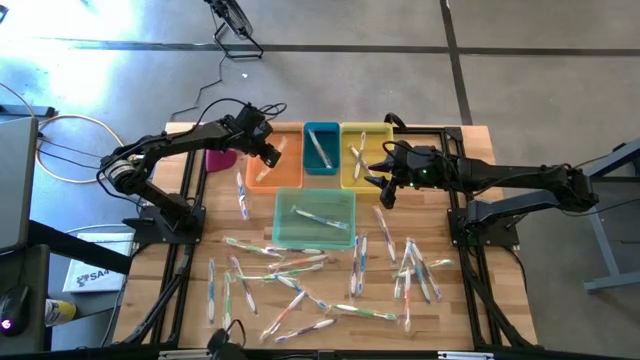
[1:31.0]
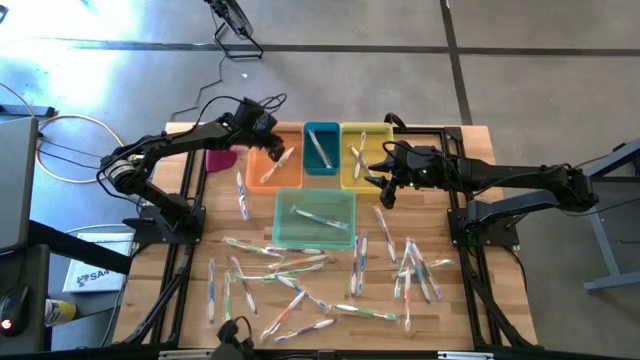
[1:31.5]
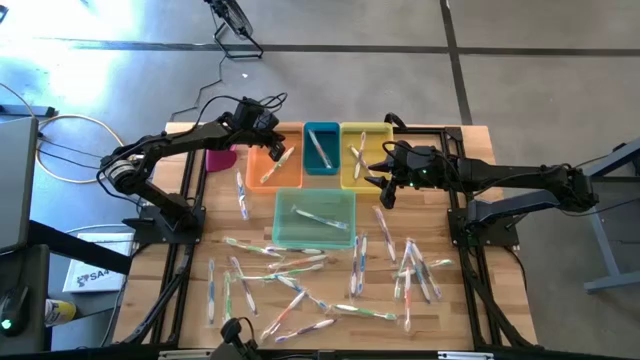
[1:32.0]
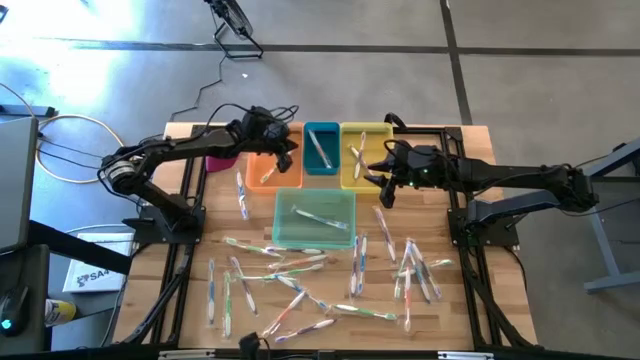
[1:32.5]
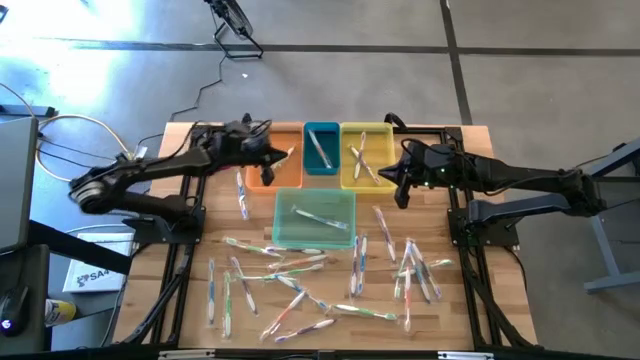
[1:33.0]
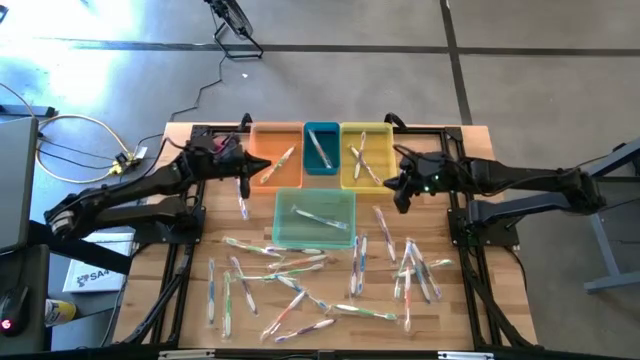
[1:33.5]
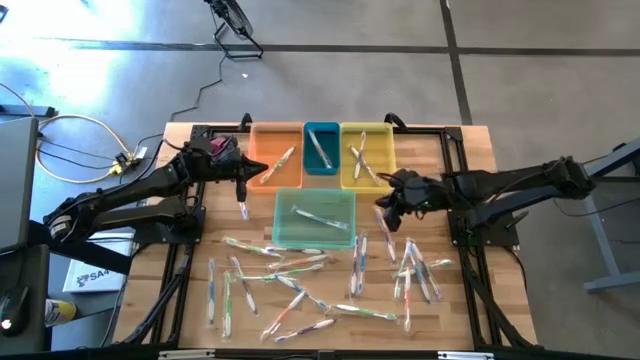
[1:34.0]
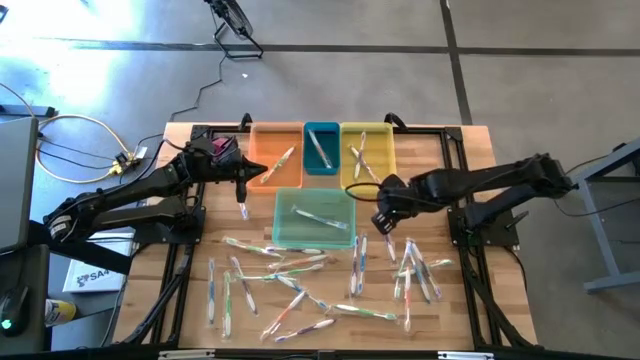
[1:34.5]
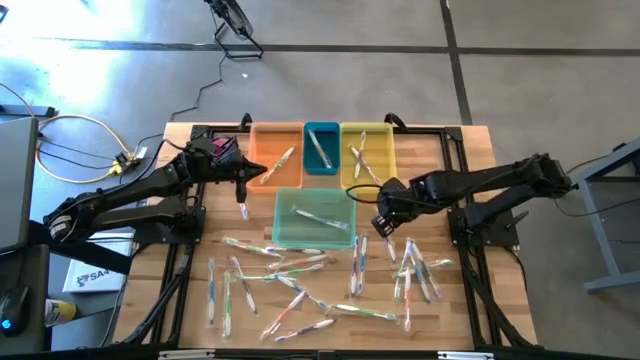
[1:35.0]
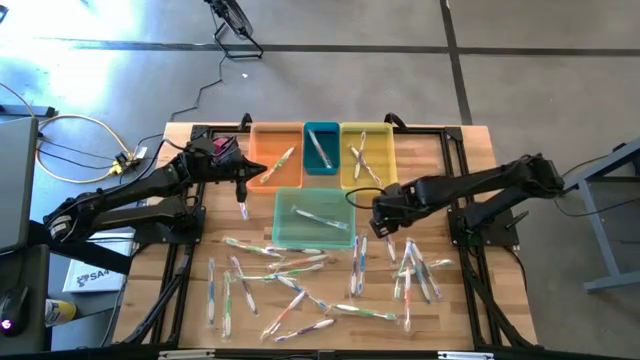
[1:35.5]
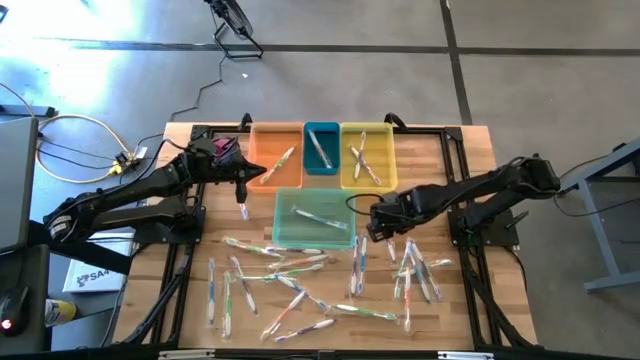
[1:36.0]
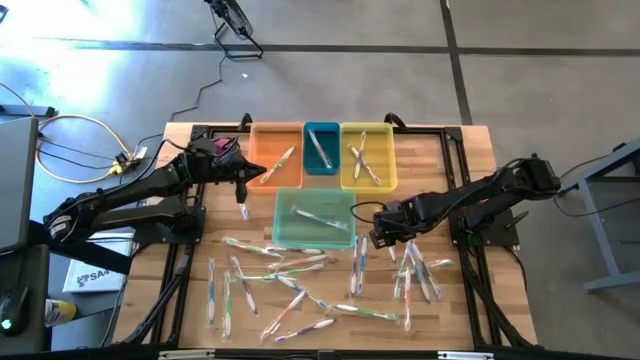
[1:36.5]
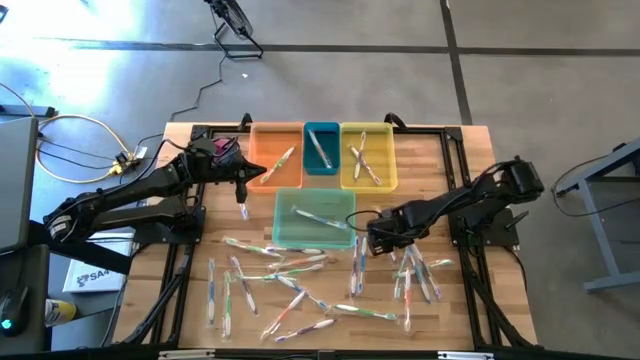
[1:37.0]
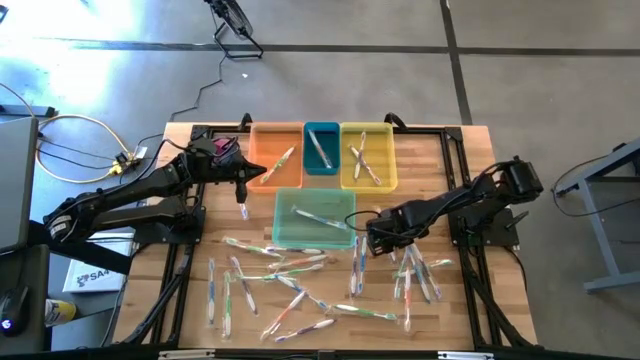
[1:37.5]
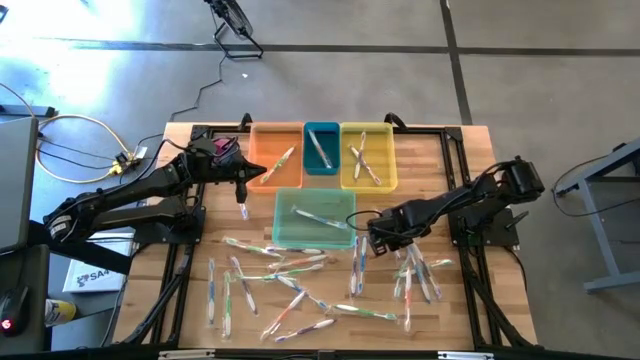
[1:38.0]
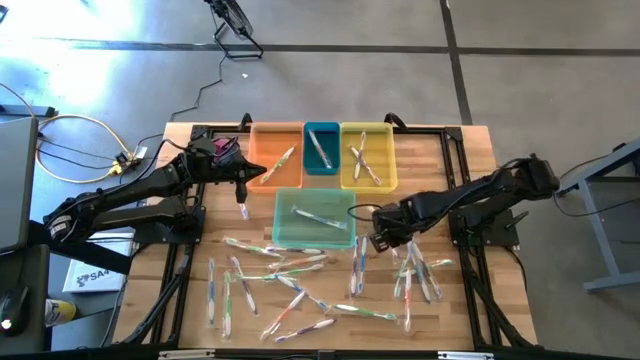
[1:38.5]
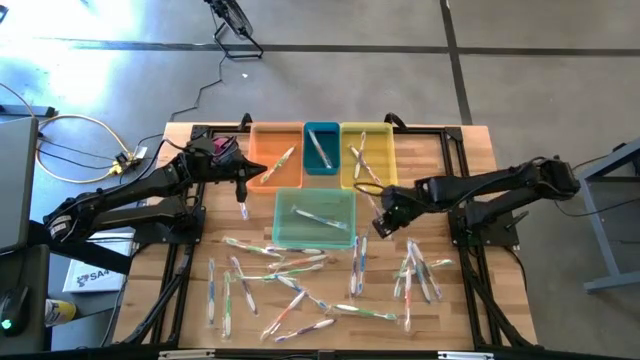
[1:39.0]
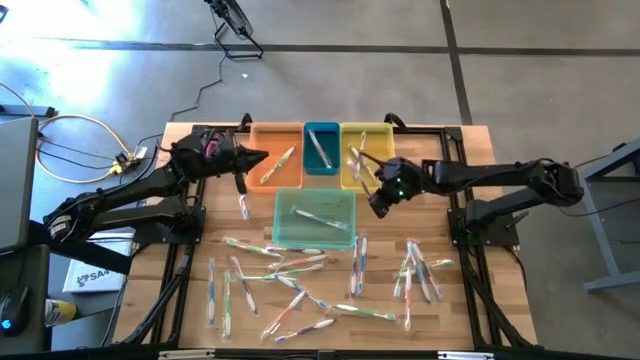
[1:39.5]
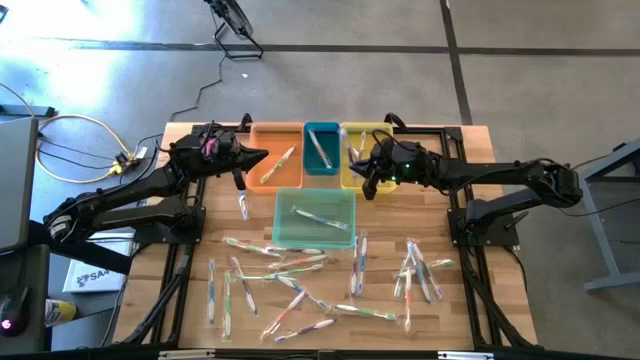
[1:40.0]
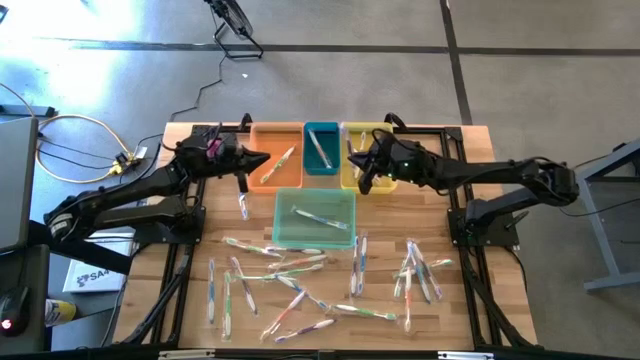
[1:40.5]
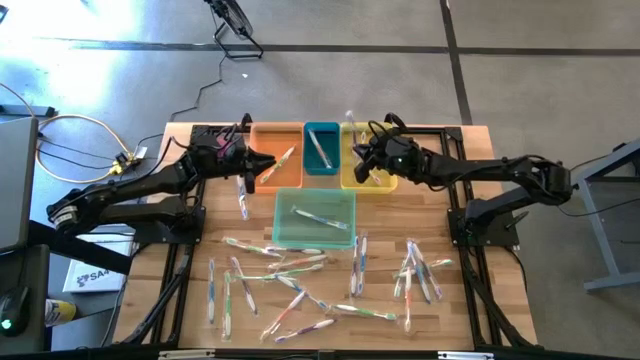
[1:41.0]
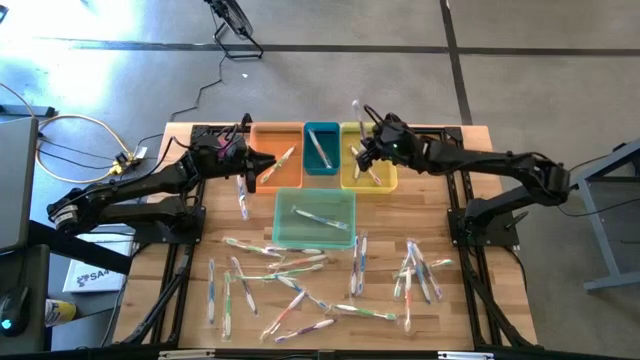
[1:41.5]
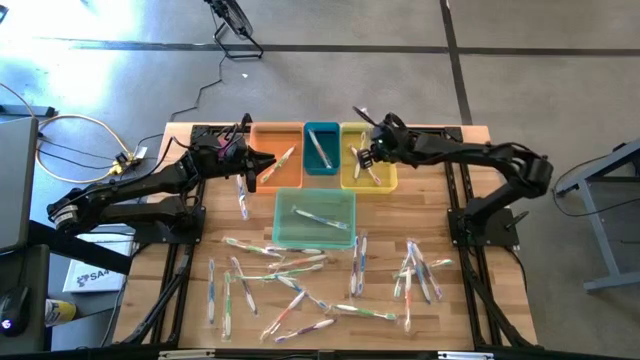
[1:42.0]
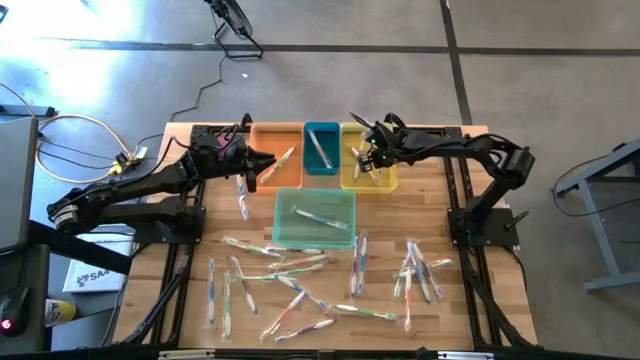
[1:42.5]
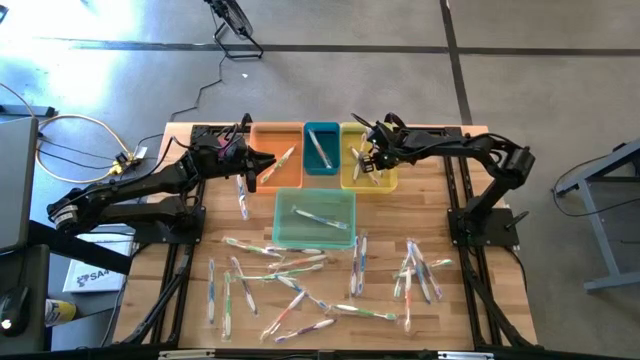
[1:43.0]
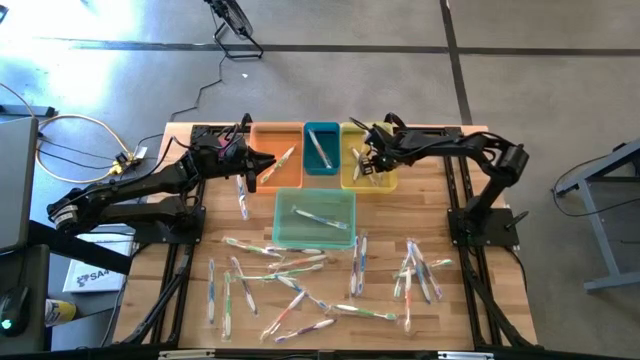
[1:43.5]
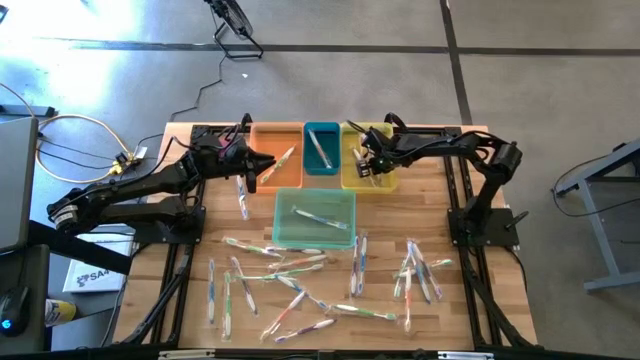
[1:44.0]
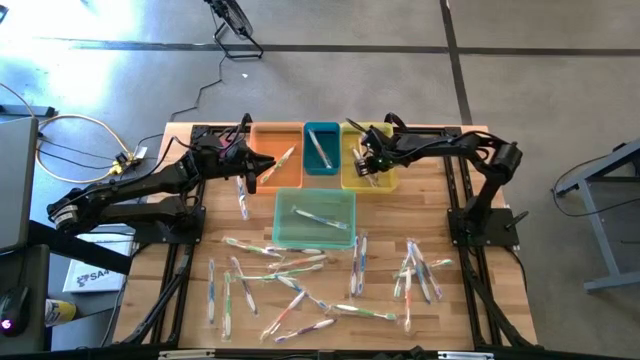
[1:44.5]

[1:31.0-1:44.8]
Task: Pick & Place Toothbrushes
Put the purple toothbrush into the yellow bin
